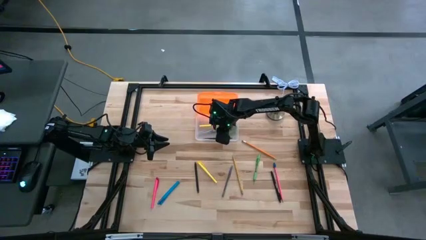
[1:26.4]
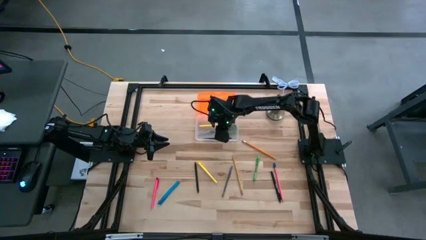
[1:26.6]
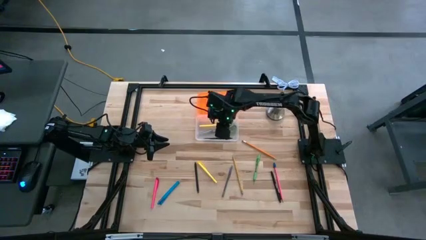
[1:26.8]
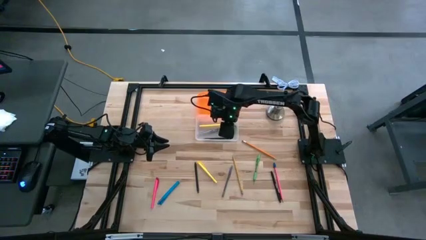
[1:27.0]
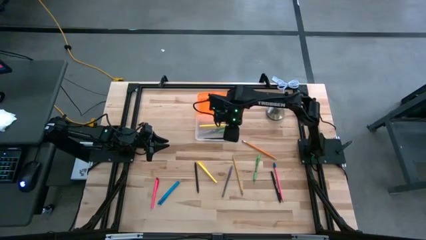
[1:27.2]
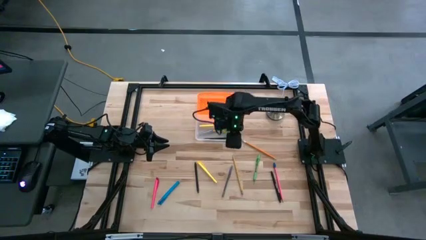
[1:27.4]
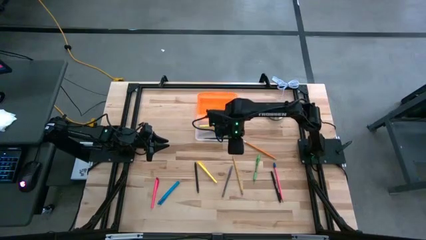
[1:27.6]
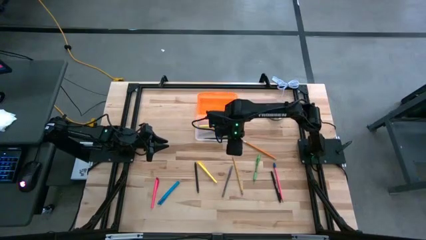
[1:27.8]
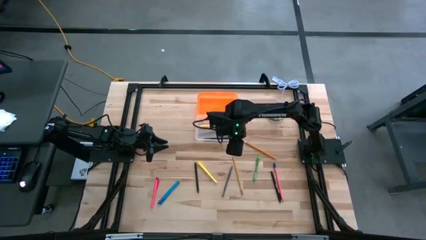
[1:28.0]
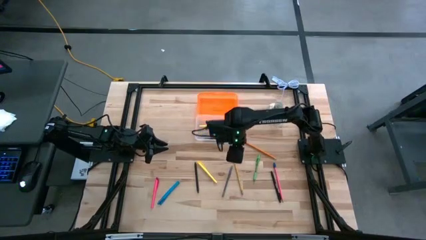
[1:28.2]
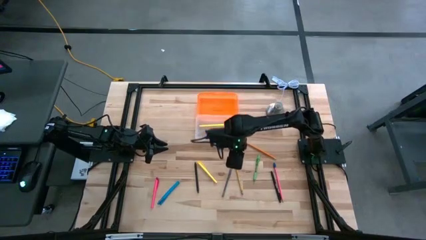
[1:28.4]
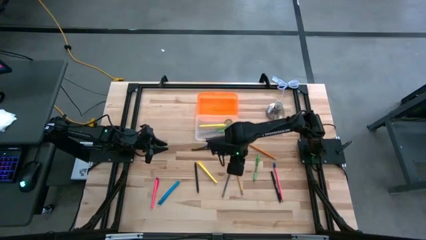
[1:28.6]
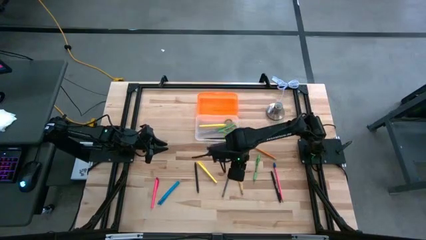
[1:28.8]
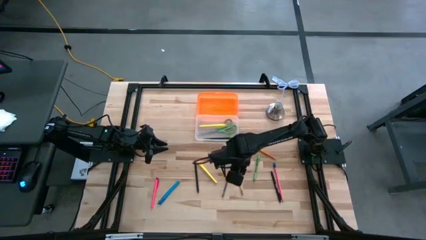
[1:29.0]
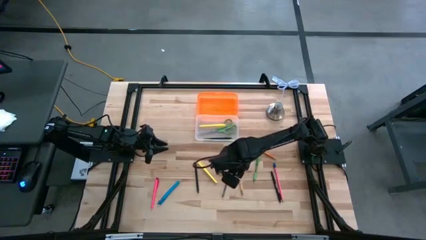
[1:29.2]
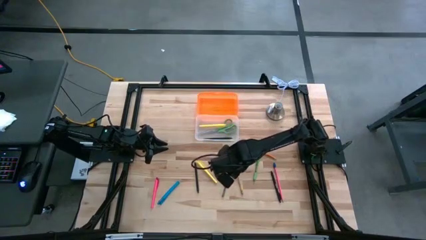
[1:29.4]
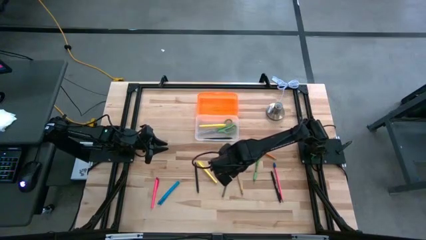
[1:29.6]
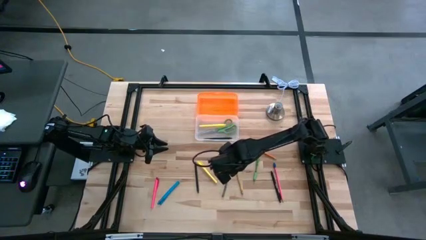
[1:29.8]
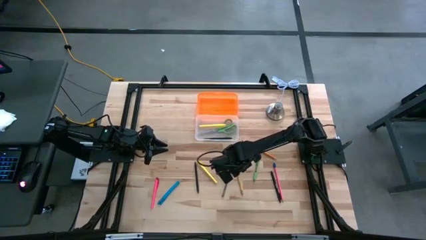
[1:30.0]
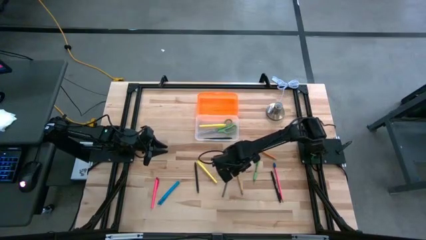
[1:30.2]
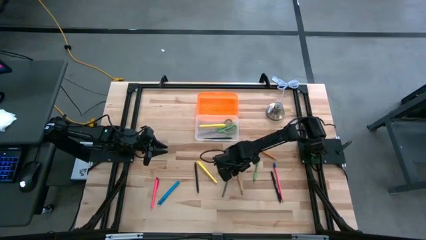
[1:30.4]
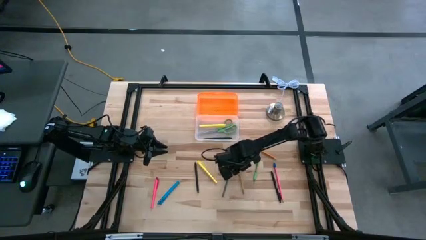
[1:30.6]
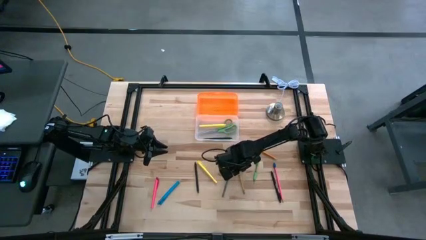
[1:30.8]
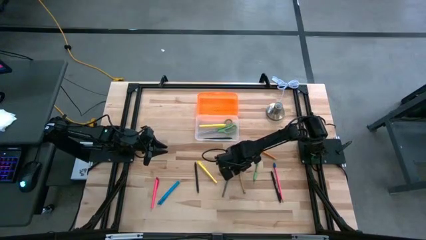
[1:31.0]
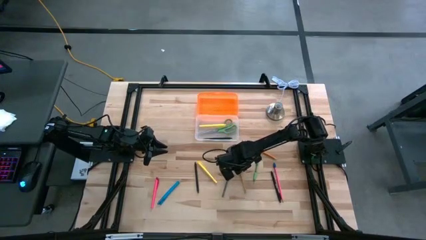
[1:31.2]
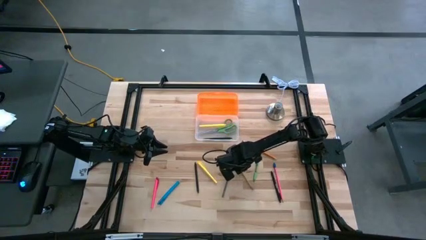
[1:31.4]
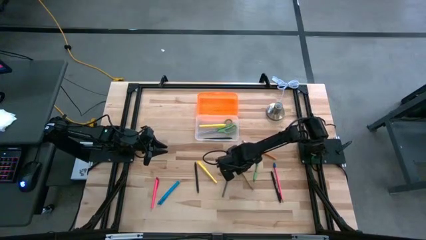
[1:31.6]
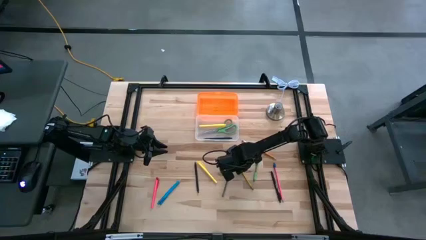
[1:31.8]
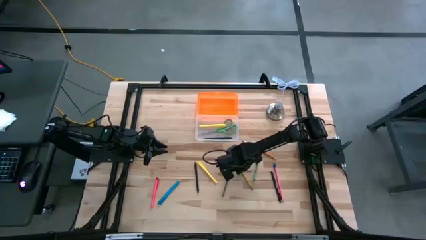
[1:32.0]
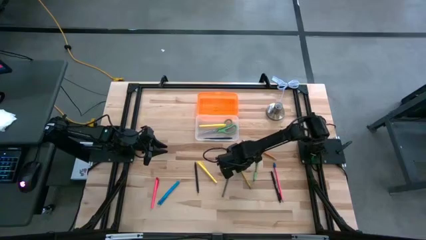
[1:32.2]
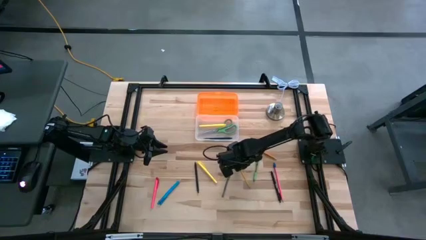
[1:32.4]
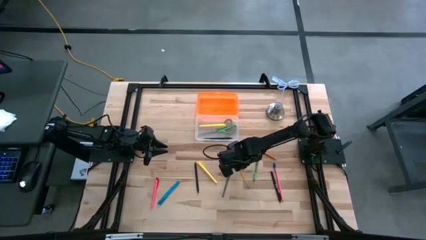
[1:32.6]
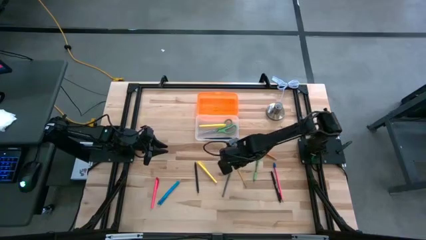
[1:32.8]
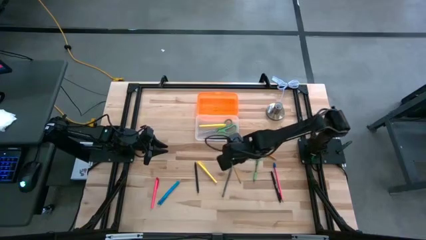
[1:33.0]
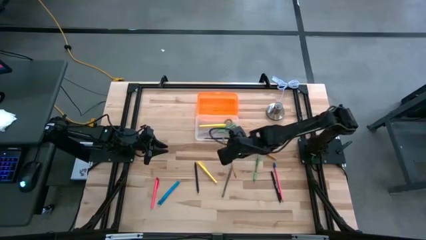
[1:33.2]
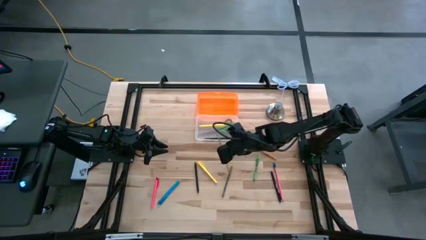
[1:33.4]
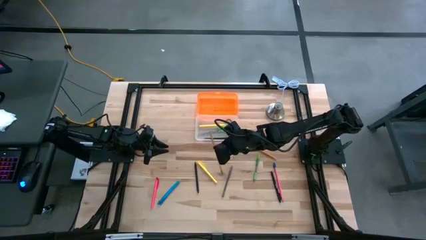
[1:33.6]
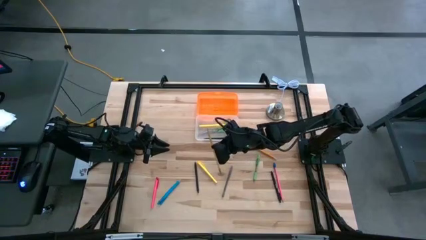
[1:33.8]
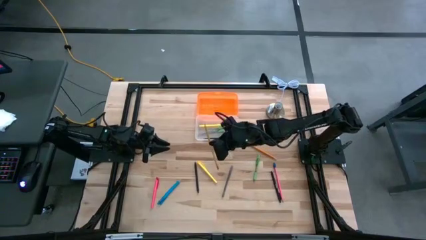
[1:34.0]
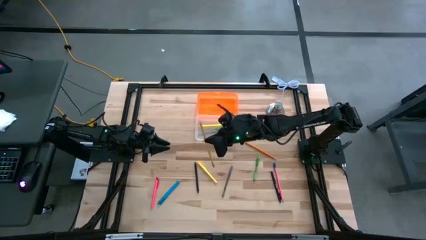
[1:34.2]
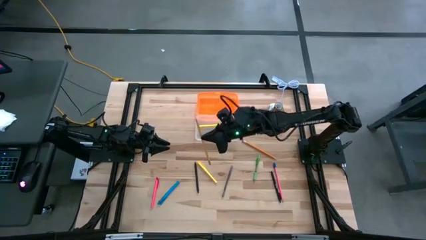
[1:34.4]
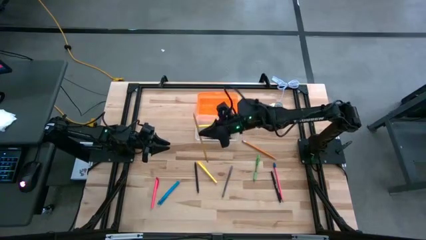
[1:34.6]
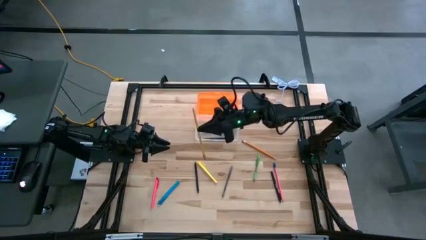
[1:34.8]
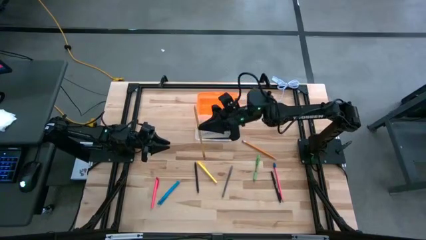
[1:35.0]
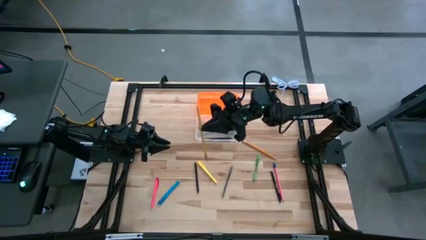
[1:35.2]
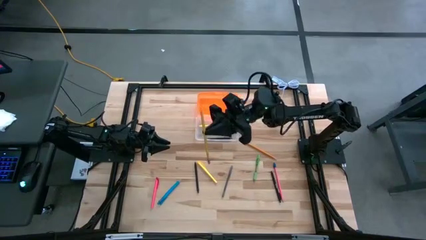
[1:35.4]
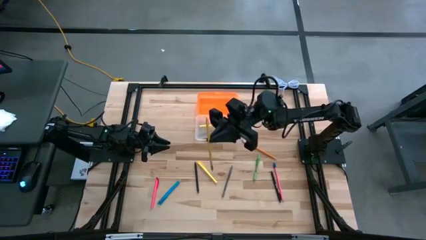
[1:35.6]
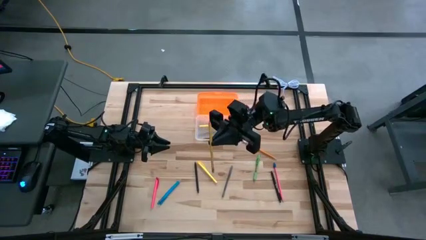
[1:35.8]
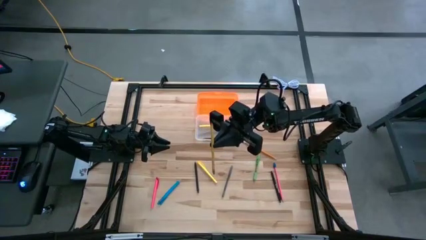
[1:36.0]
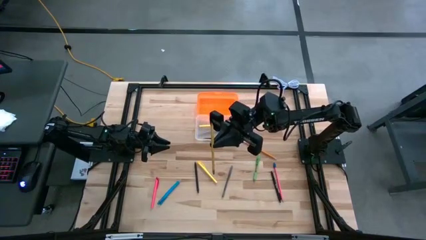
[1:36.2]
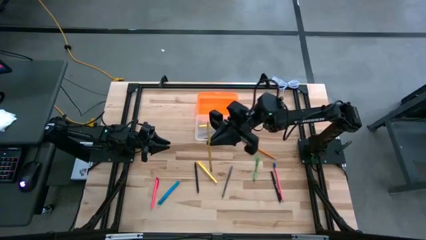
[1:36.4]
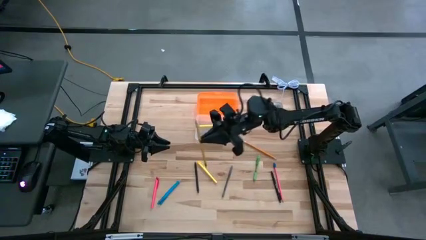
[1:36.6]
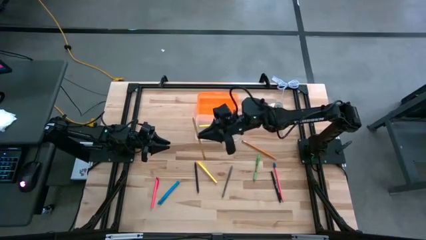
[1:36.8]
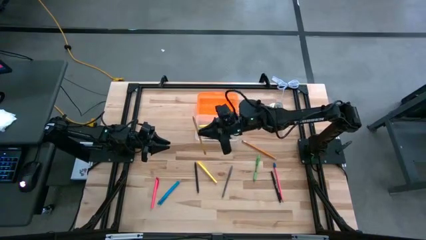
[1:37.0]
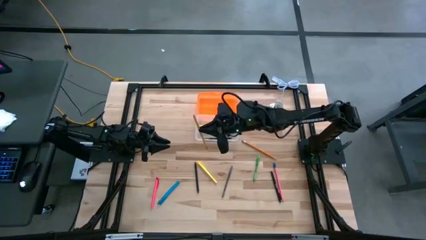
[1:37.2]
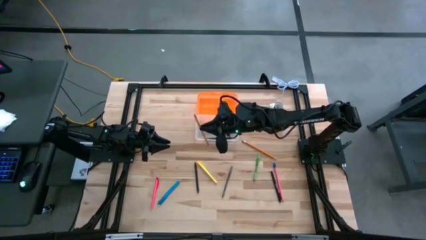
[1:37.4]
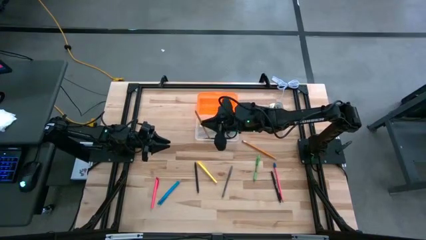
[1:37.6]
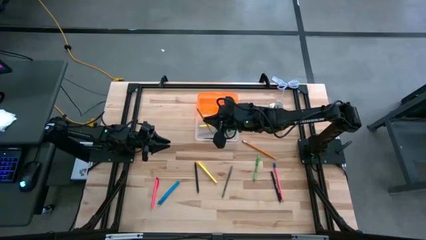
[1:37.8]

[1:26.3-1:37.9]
Task: Pick & place school supplies into a supply box
Put the yellow pencil into the orange supply box

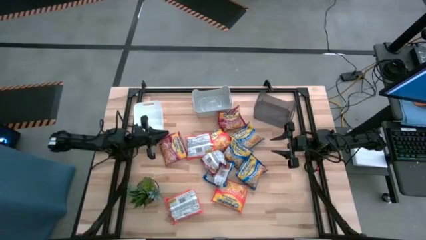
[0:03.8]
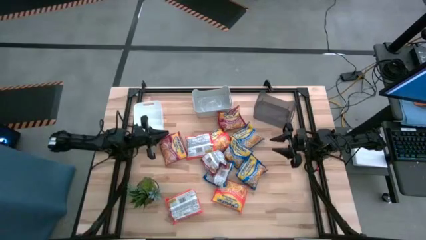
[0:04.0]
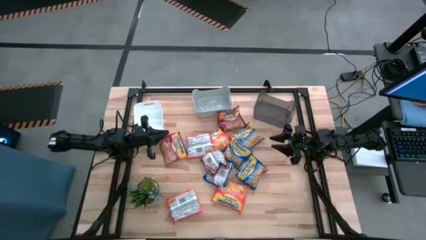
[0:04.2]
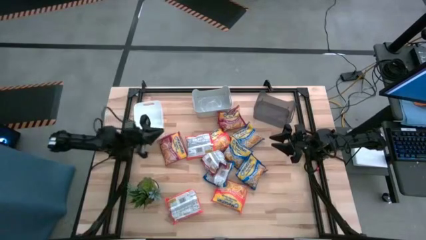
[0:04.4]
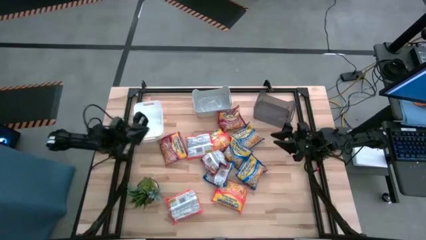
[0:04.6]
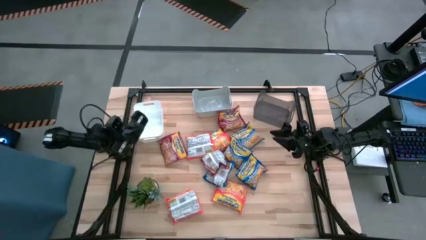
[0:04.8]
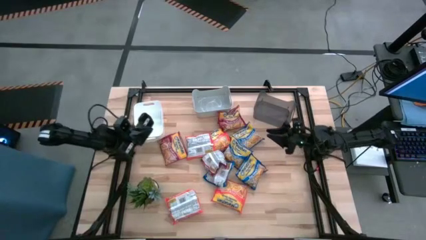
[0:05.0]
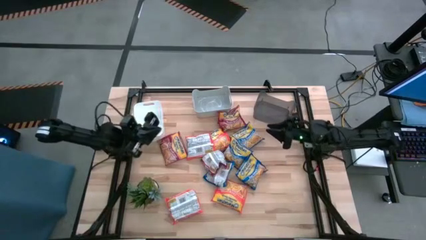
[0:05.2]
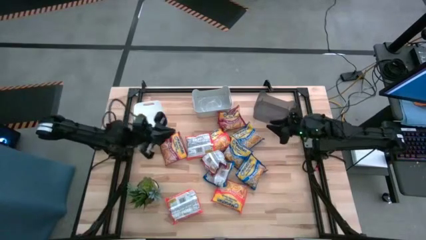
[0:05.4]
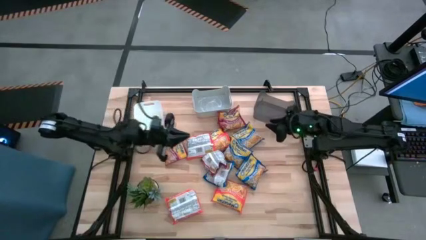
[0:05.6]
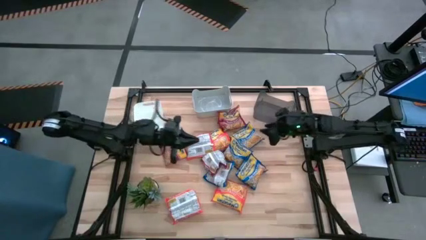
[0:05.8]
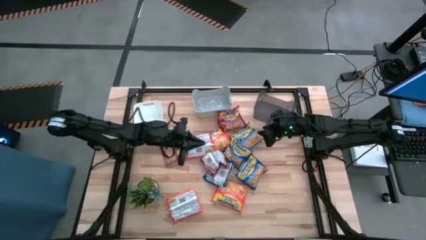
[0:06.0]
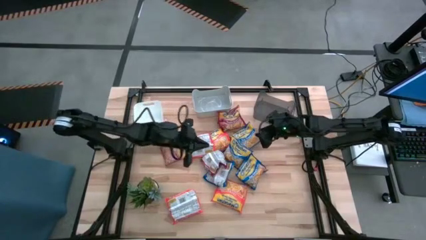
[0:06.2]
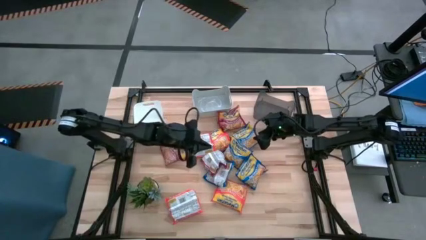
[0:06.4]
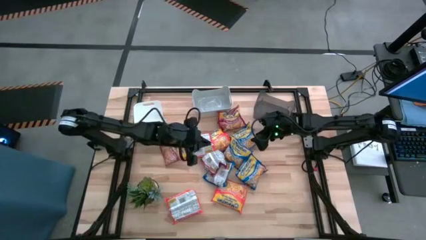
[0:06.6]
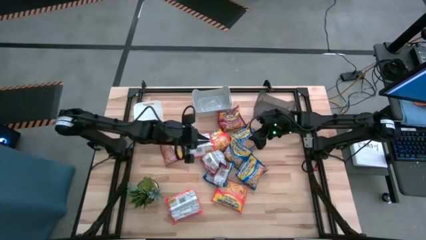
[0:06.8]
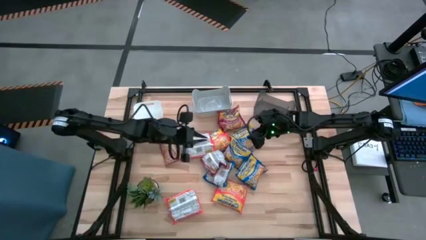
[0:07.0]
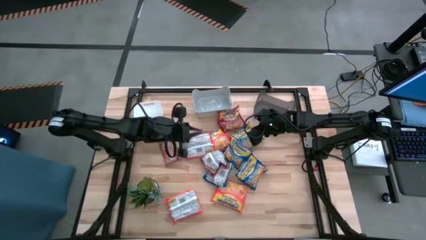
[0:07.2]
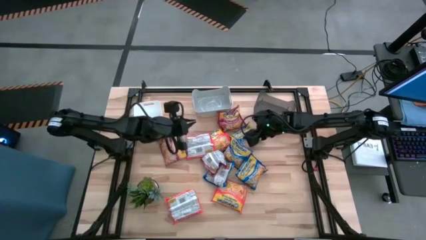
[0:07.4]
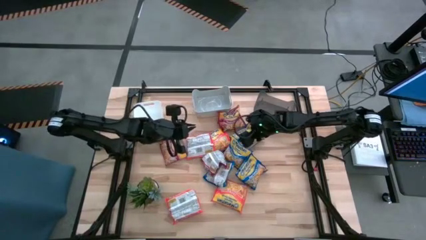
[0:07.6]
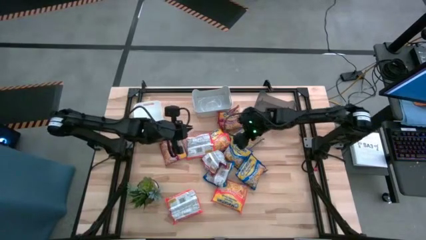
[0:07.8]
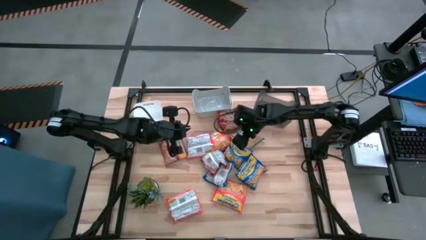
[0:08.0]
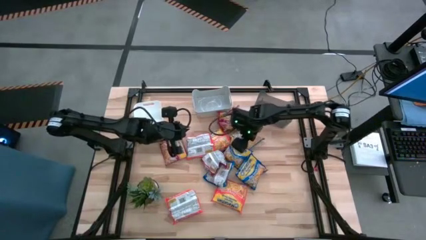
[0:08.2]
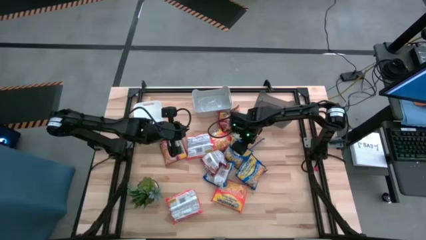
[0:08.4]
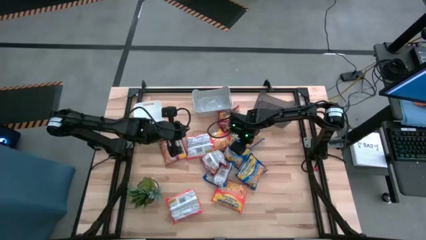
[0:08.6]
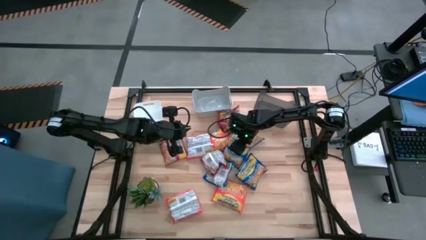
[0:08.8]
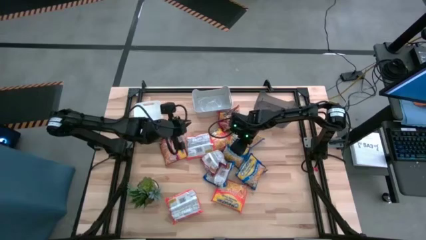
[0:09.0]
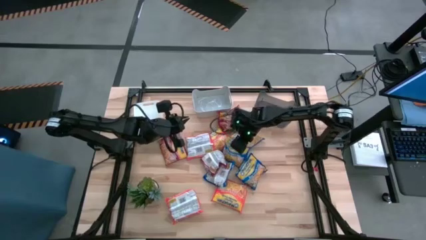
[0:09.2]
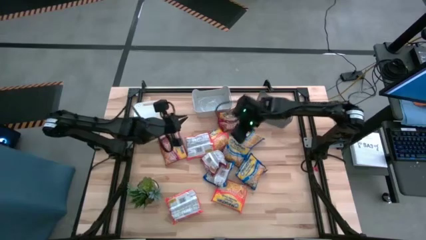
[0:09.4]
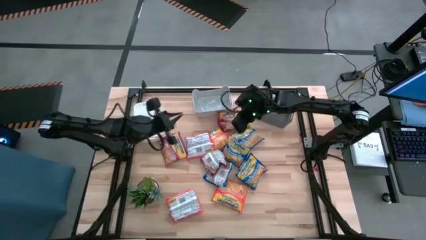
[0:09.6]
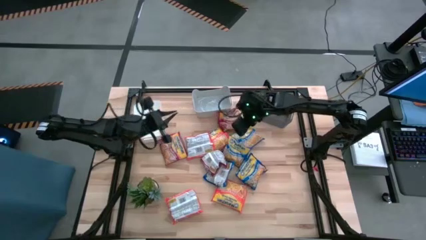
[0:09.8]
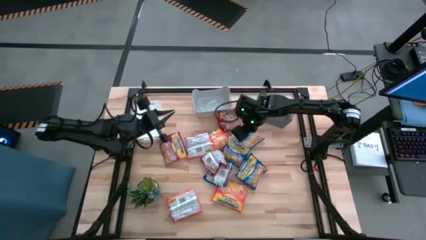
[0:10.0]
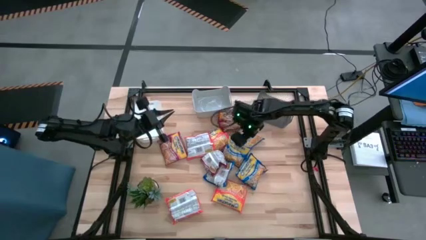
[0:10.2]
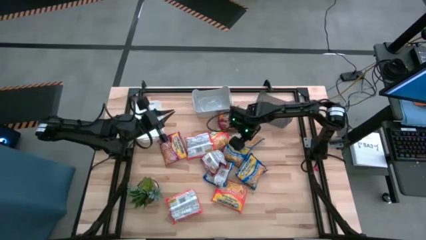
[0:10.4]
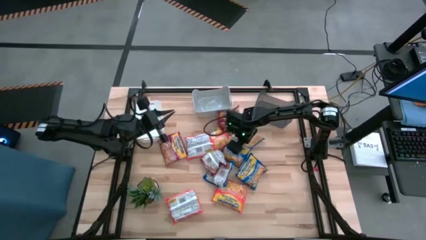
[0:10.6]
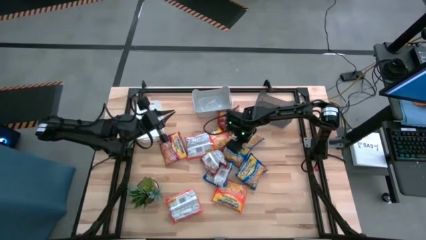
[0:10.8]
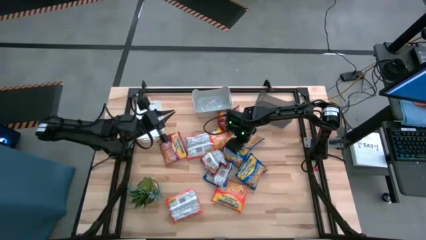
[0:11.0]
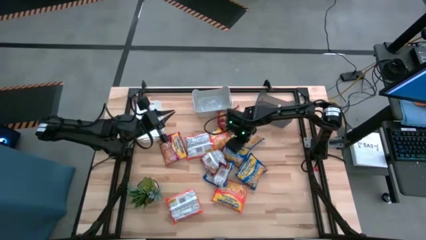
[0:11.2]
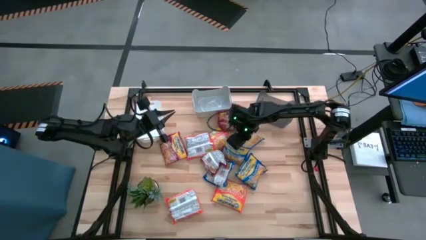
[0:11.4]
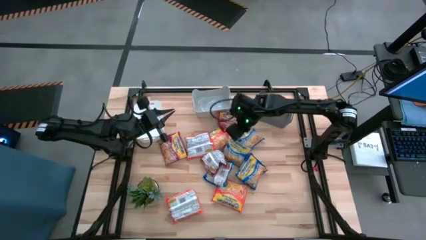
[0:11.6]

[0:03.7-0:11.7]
Task: Sort Maruchan noodles
Put the middle blue noodle pack into the gray bin
